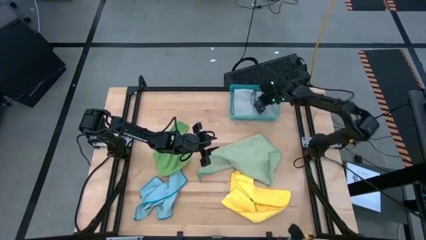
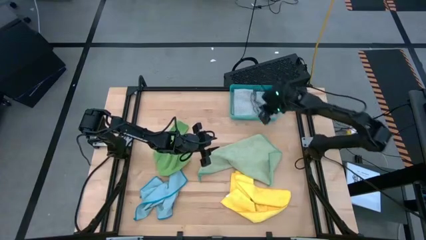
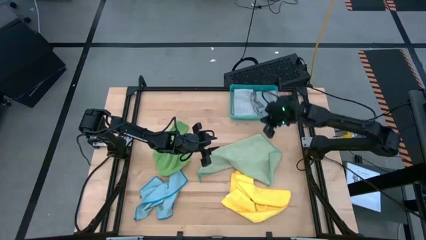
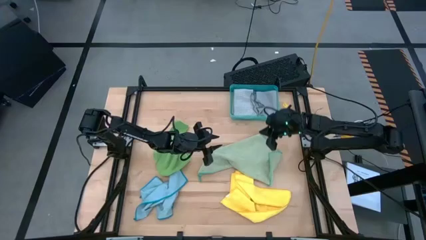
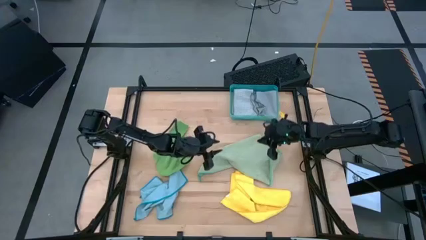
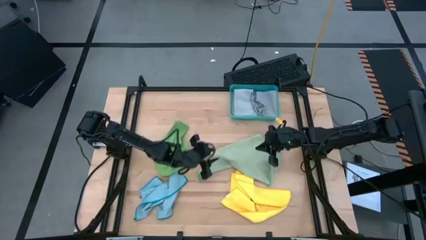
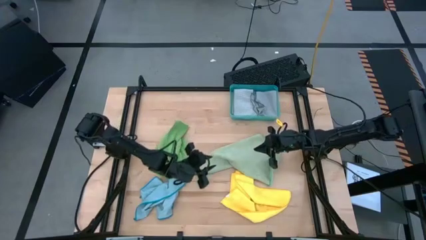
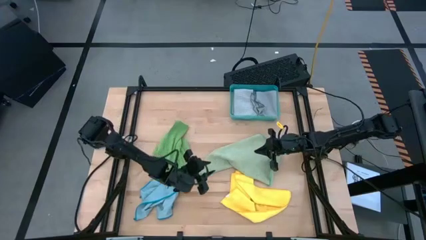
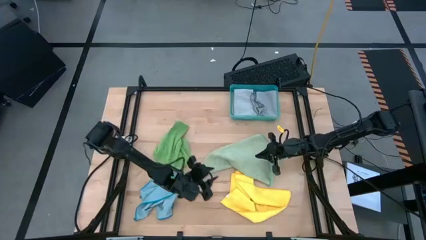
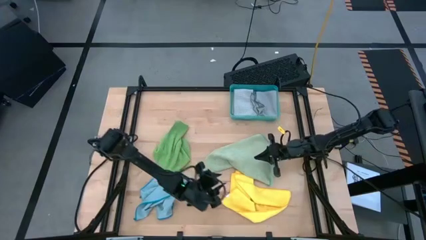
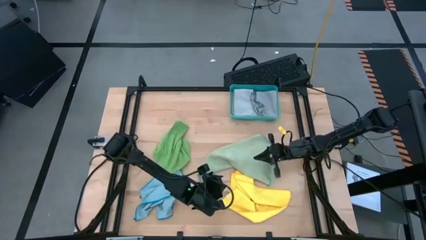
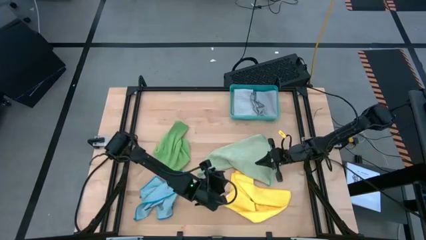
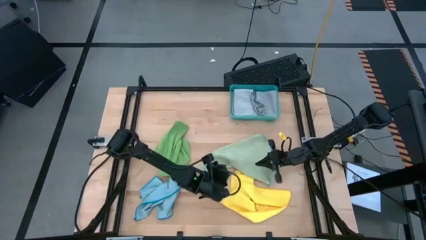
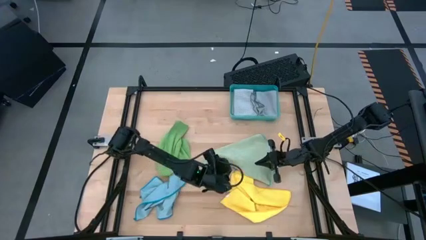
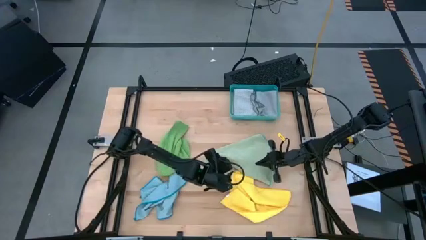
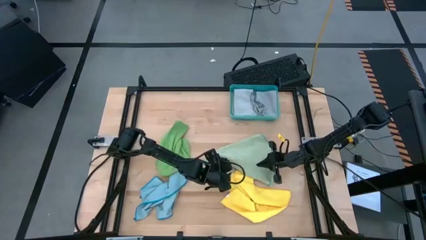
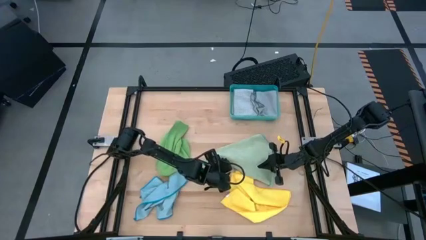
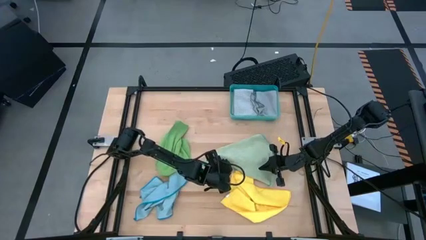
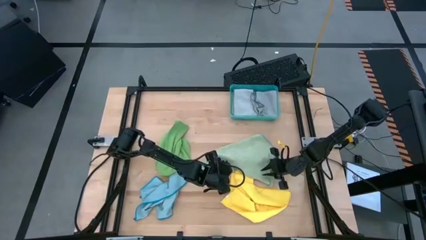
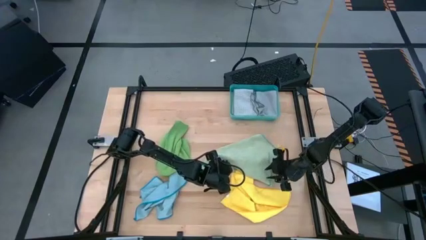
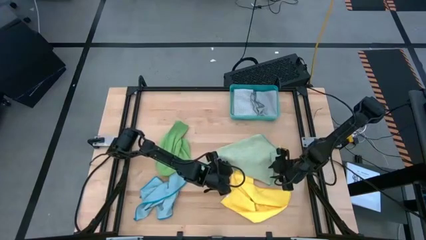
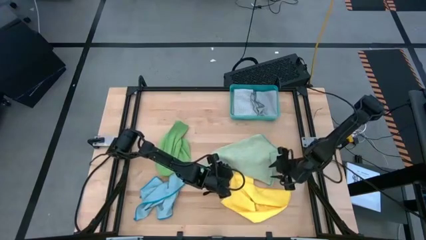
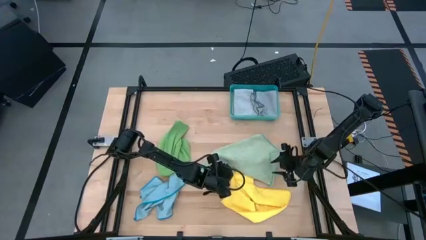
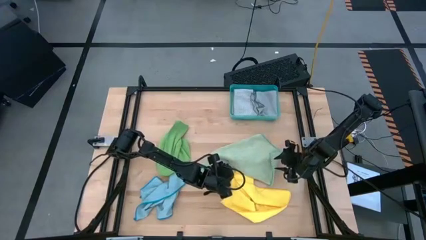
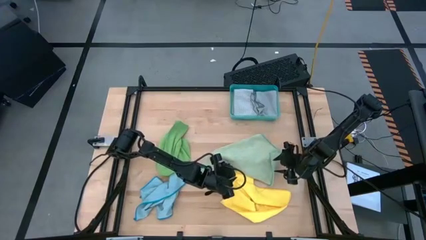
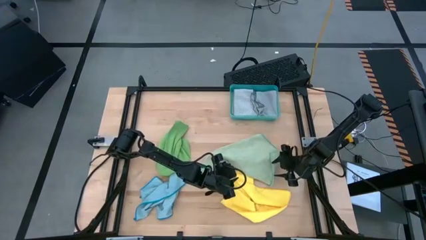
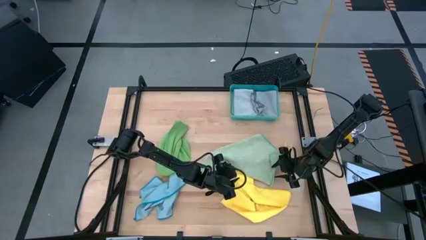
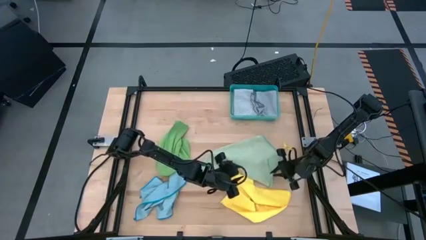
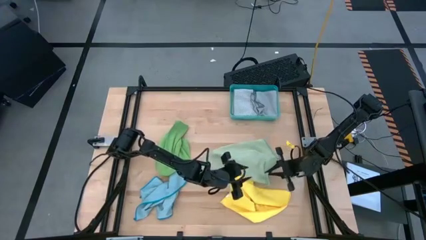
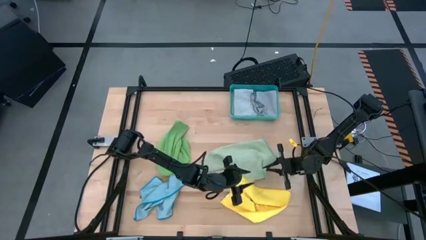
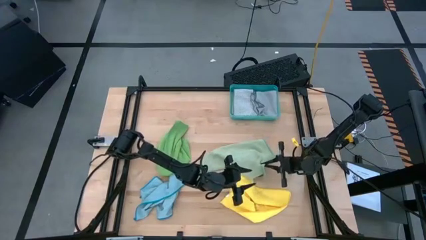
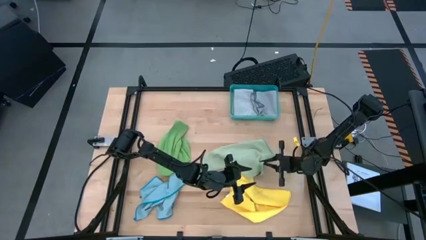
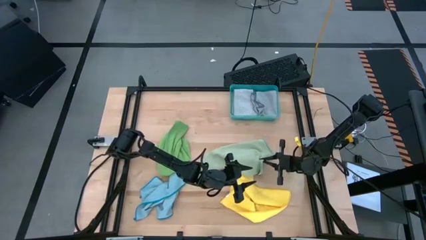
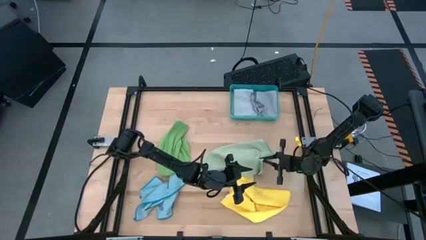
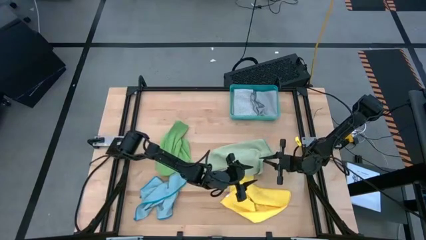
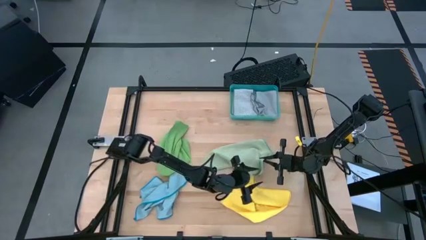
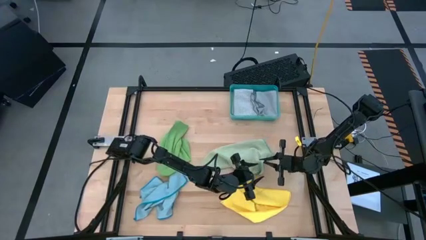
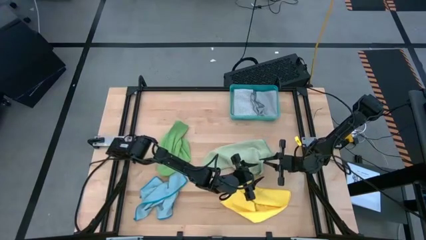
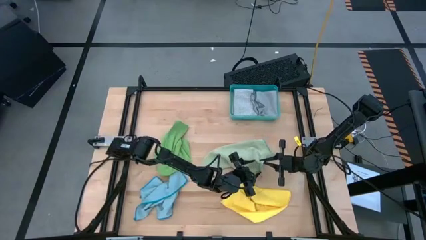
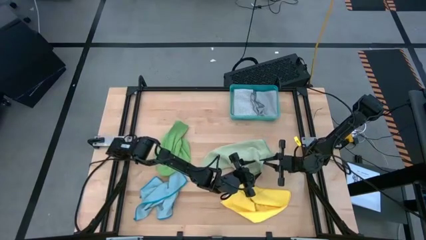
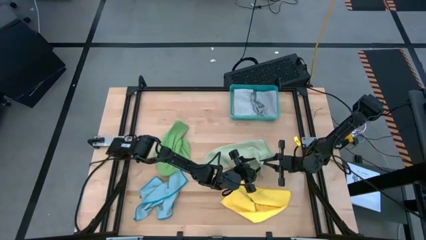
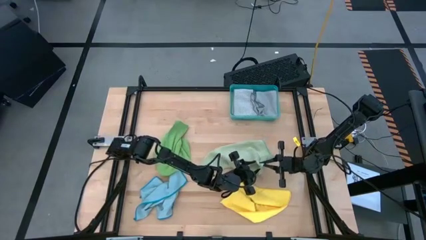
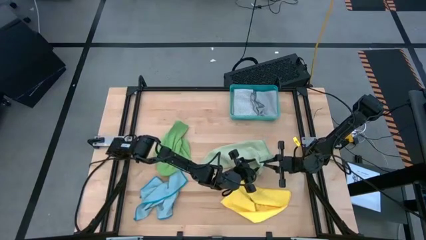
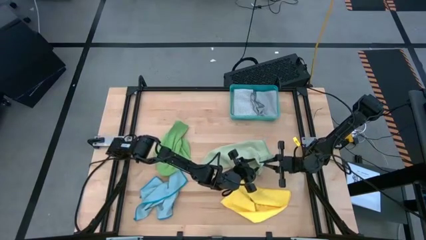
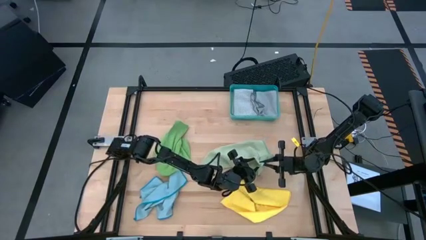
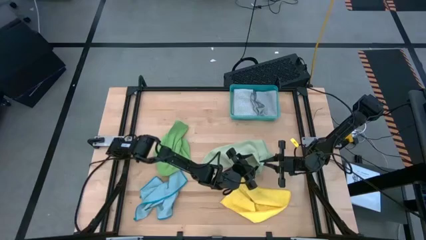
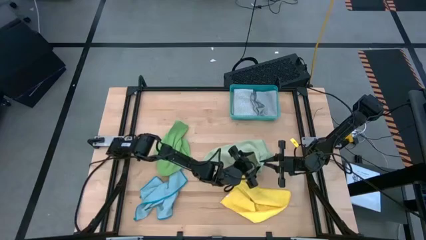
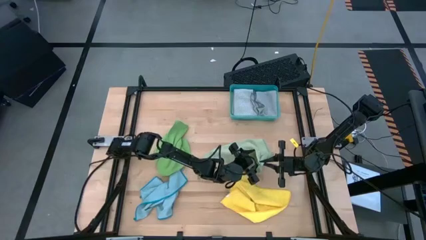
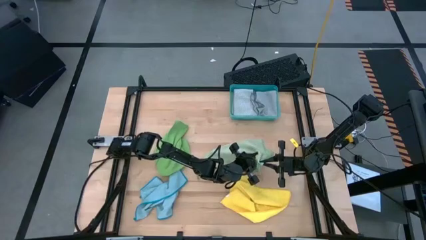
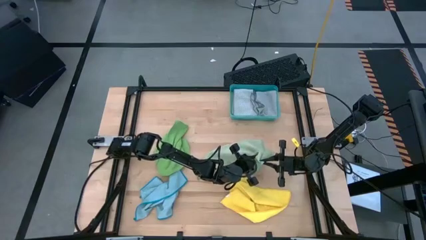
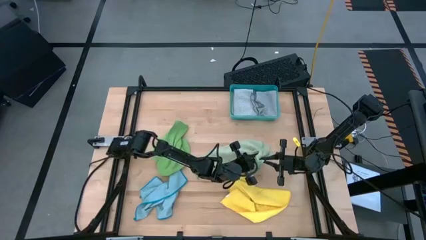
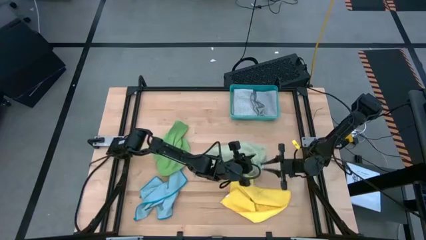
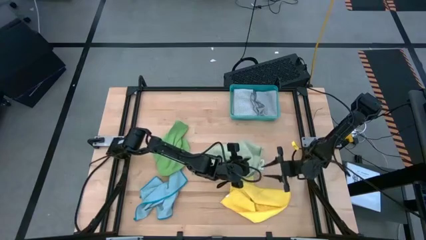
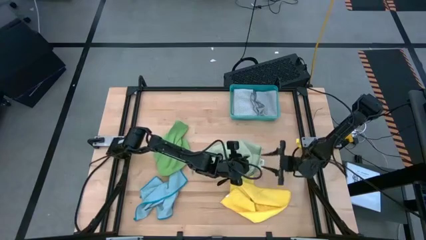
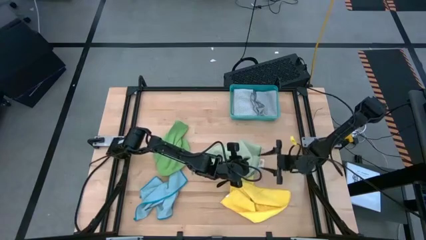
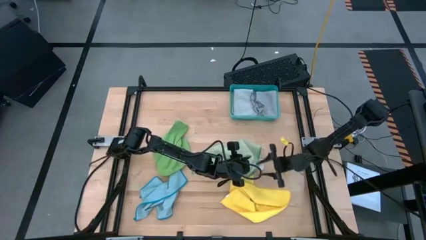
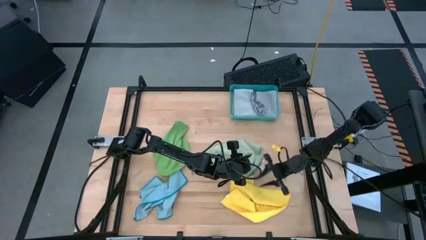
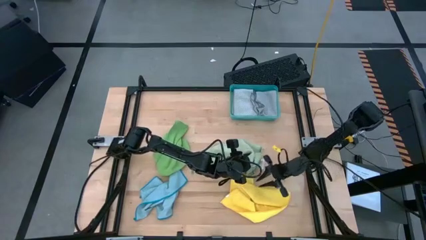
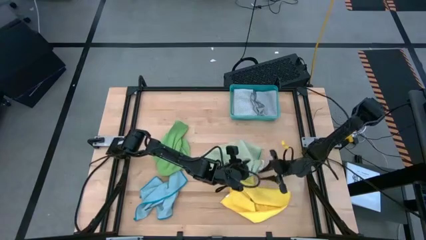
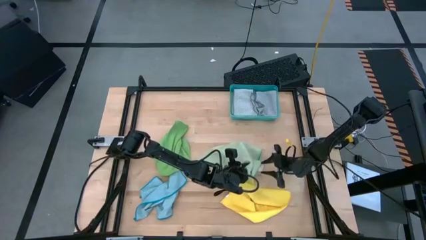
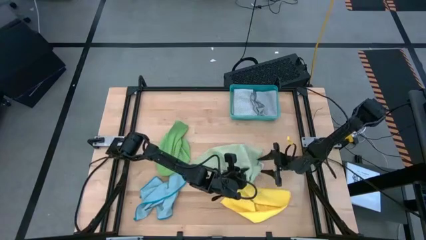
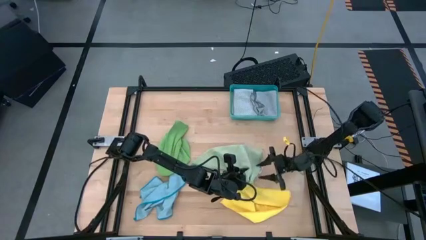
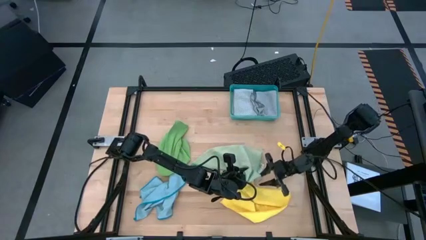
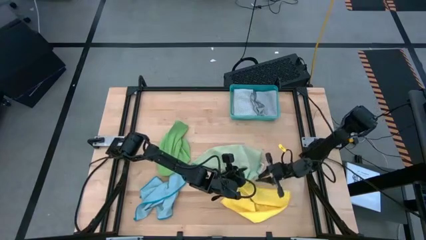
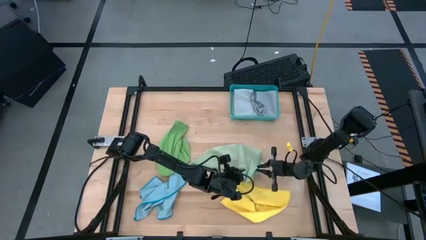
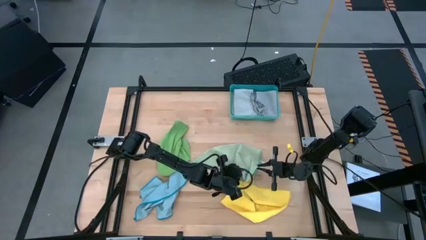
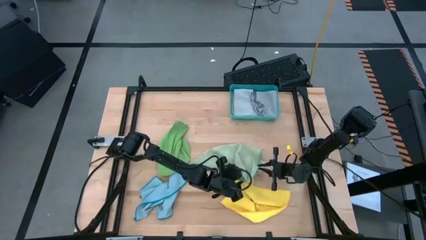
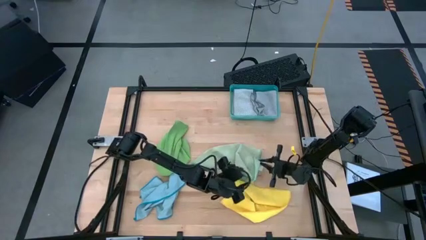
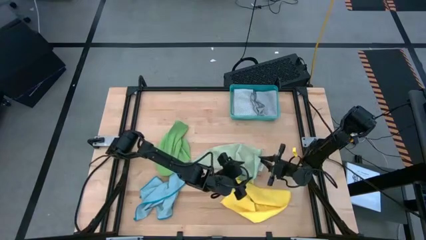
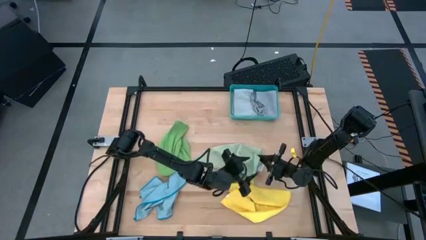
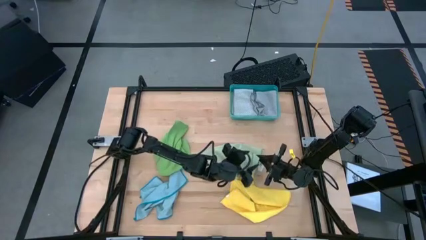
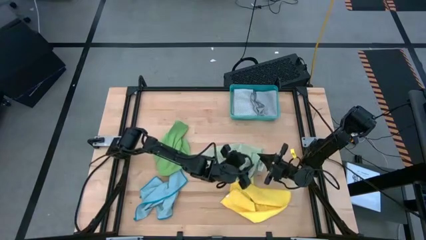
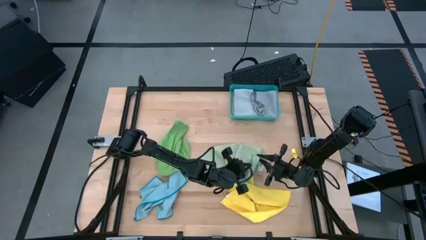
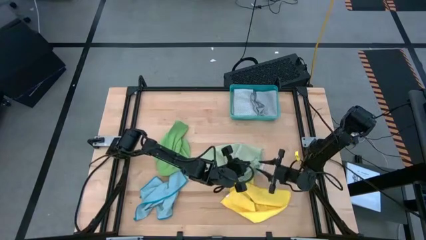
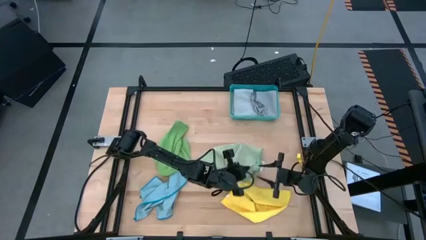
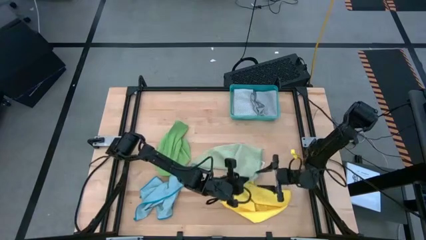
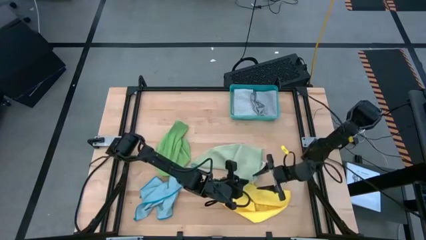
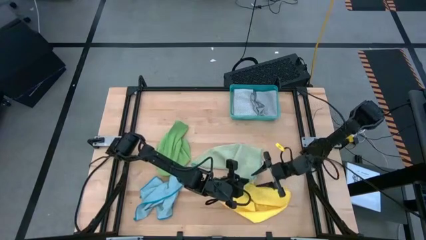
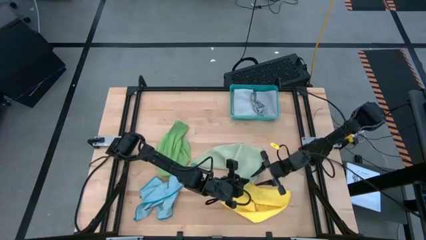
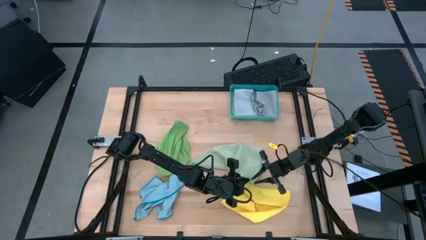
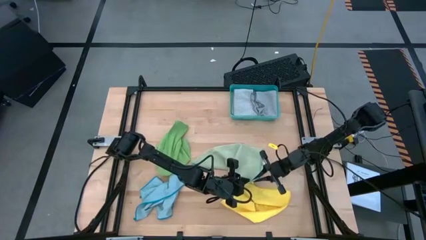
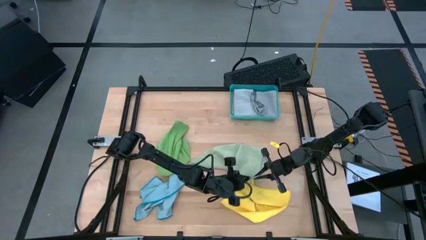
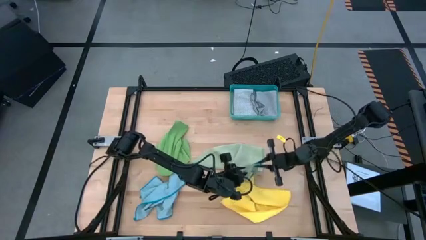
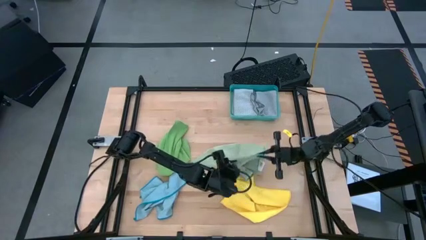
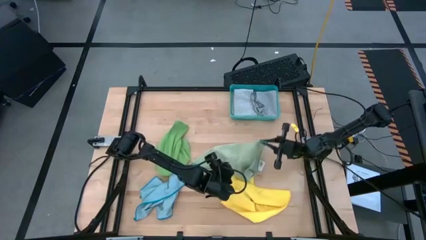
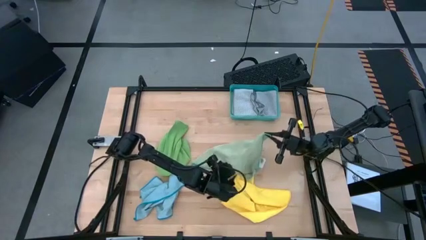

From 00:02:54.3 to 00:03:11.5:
Task: Fold microfiber towels
Fold the light green microfiber cloth
